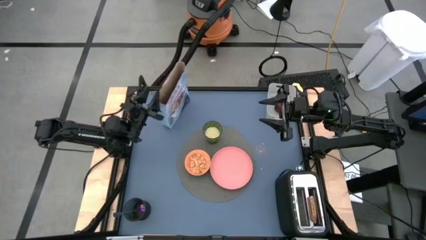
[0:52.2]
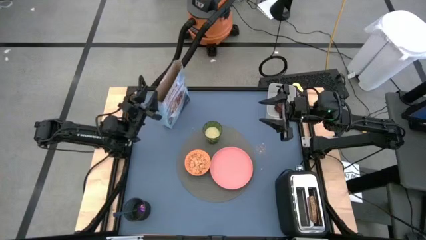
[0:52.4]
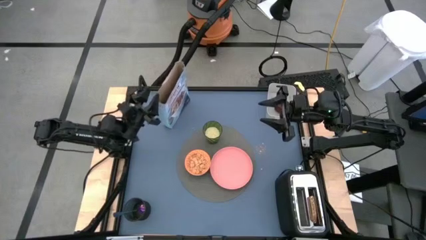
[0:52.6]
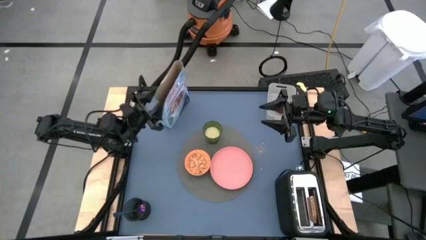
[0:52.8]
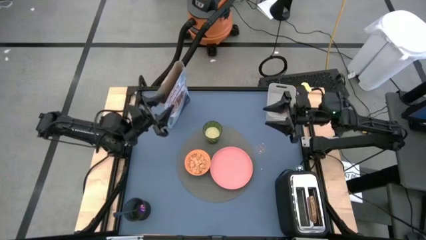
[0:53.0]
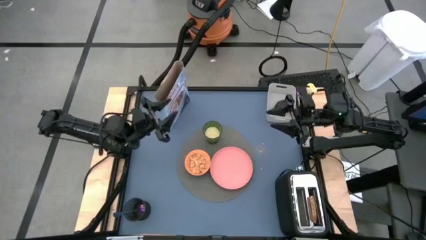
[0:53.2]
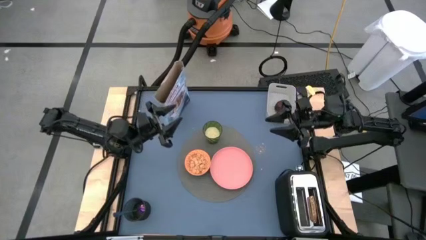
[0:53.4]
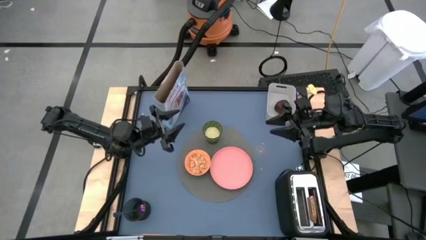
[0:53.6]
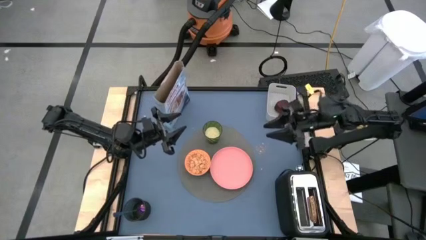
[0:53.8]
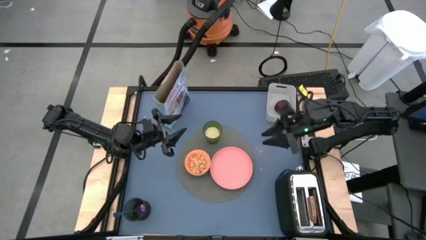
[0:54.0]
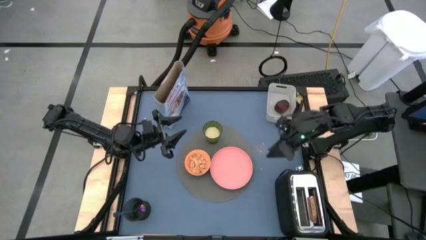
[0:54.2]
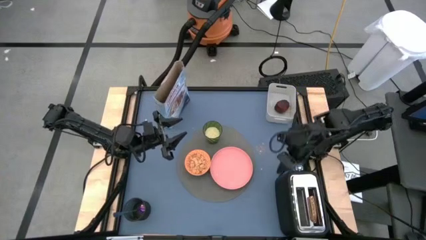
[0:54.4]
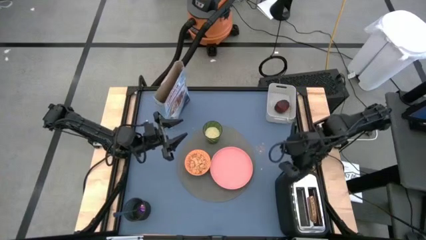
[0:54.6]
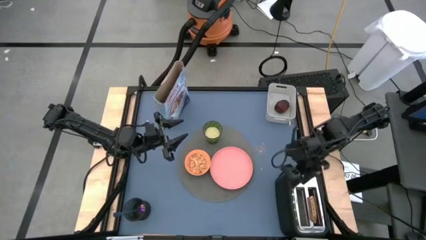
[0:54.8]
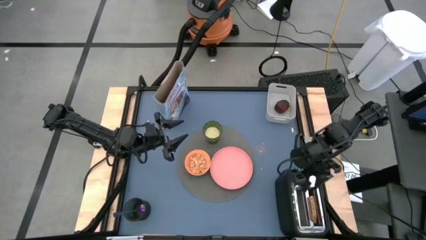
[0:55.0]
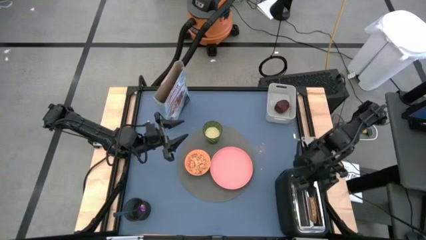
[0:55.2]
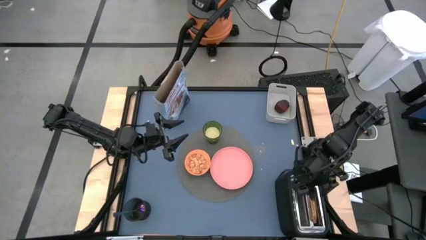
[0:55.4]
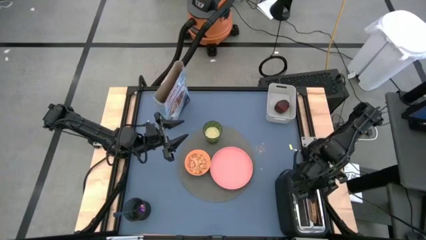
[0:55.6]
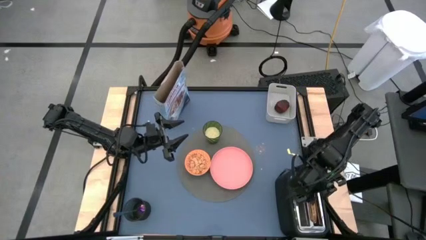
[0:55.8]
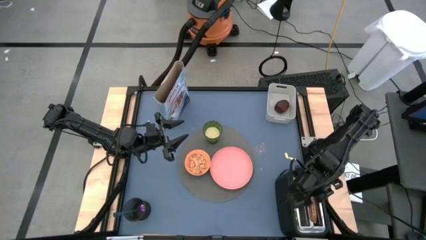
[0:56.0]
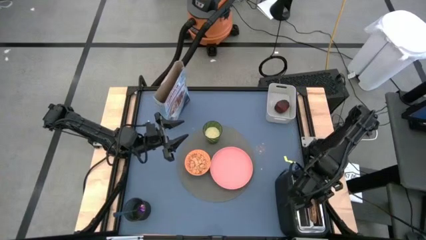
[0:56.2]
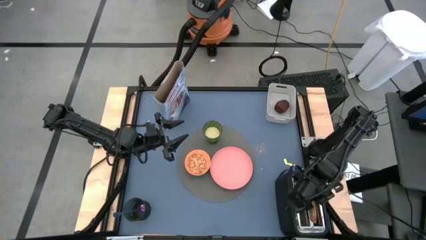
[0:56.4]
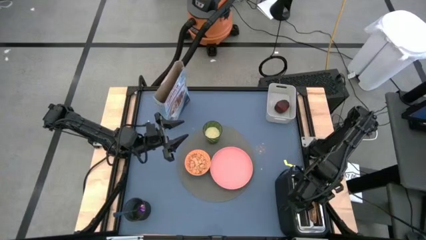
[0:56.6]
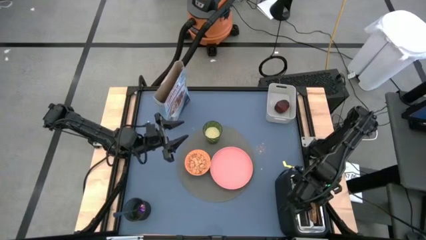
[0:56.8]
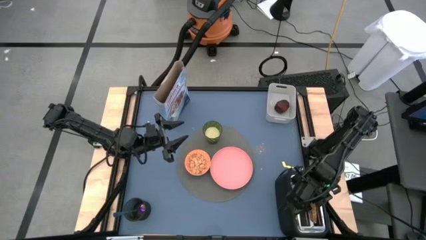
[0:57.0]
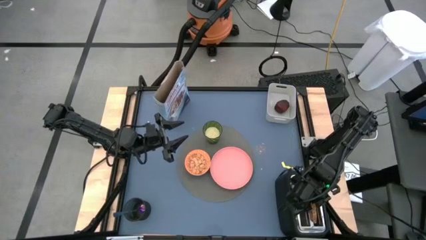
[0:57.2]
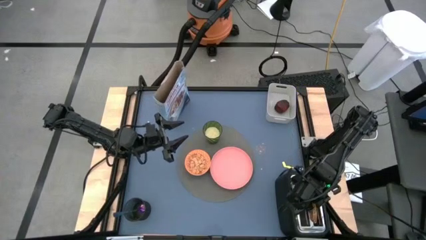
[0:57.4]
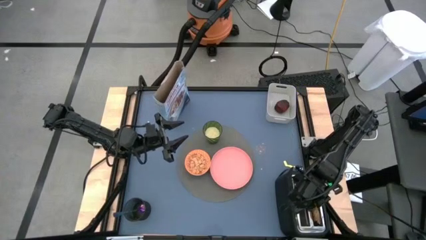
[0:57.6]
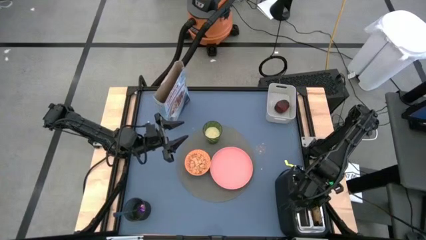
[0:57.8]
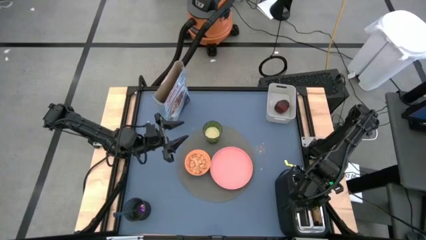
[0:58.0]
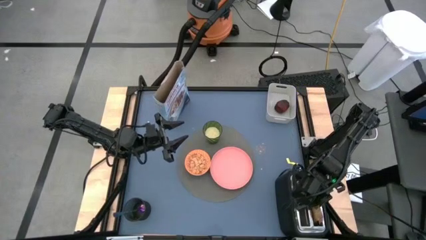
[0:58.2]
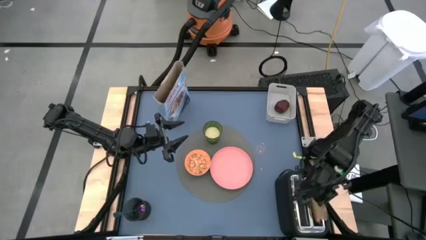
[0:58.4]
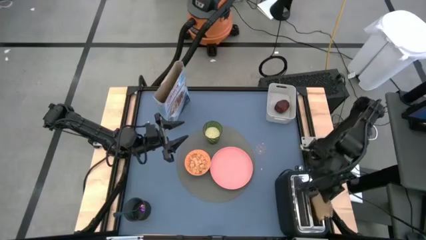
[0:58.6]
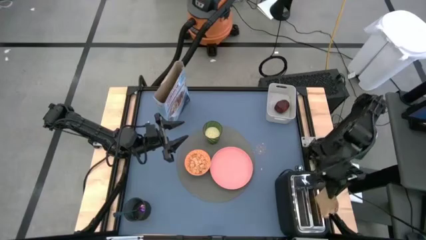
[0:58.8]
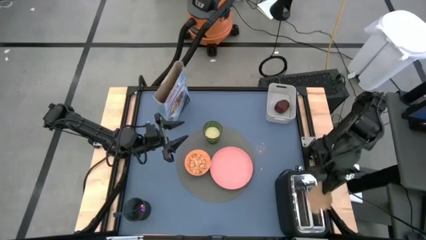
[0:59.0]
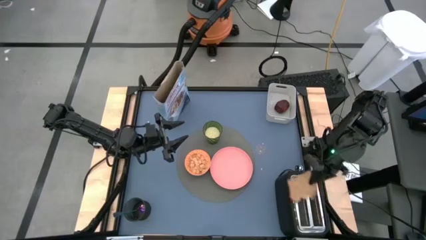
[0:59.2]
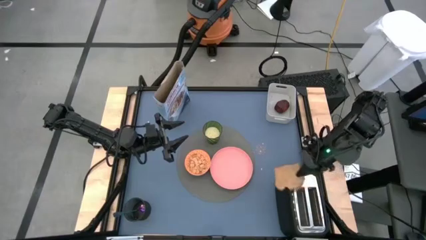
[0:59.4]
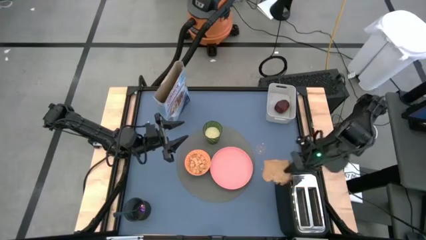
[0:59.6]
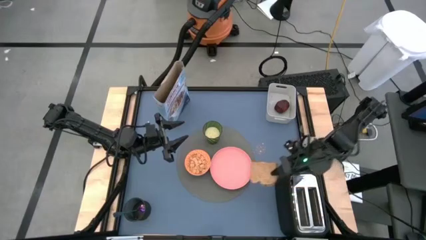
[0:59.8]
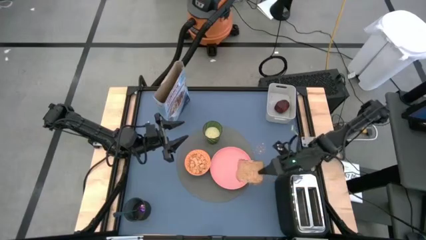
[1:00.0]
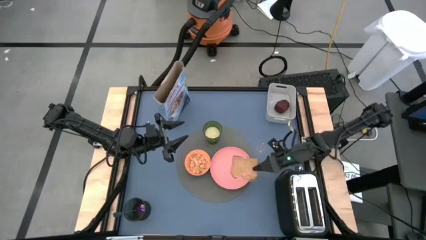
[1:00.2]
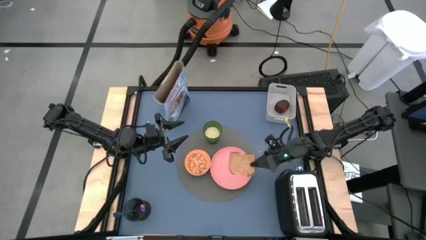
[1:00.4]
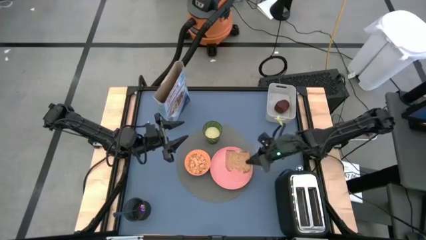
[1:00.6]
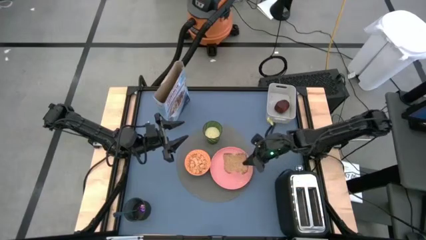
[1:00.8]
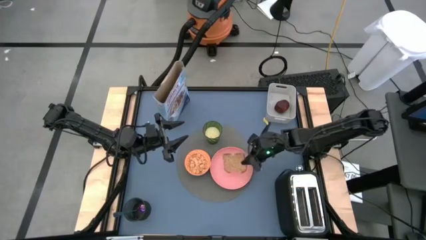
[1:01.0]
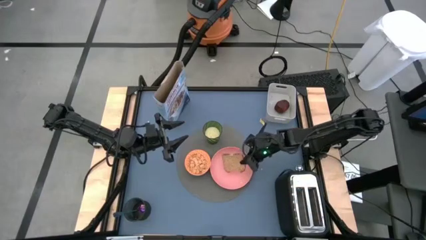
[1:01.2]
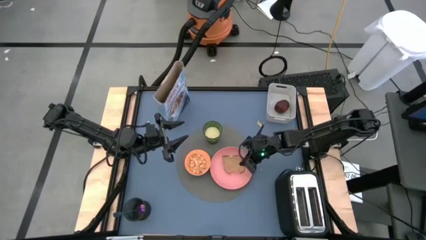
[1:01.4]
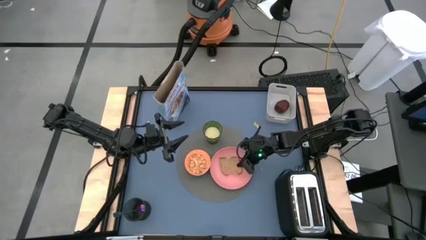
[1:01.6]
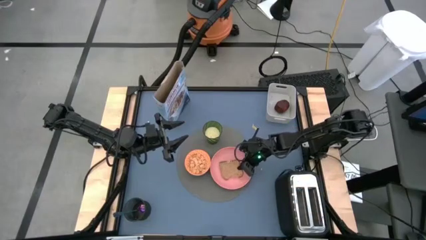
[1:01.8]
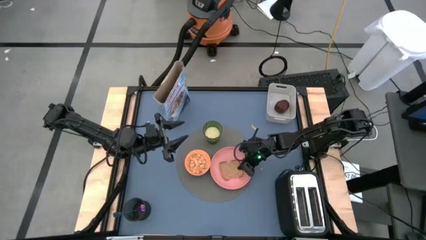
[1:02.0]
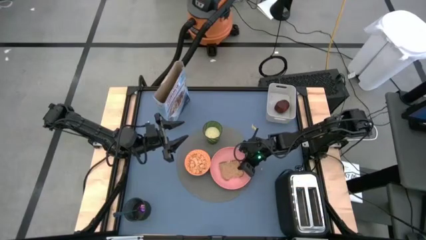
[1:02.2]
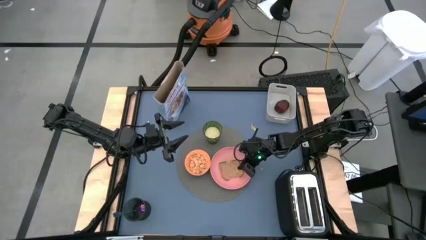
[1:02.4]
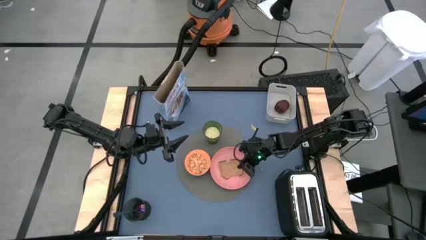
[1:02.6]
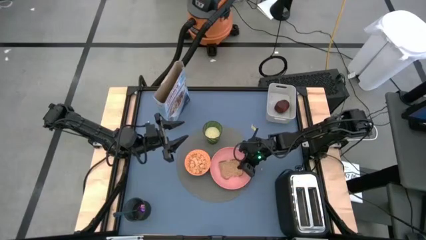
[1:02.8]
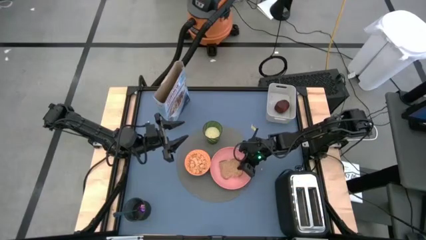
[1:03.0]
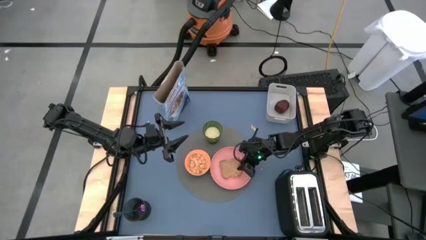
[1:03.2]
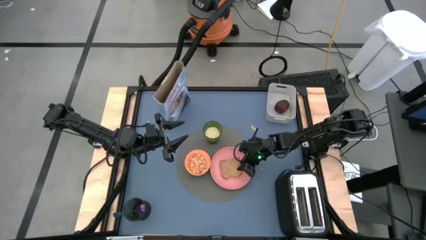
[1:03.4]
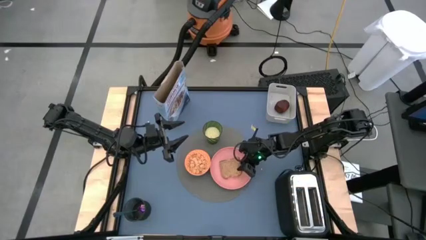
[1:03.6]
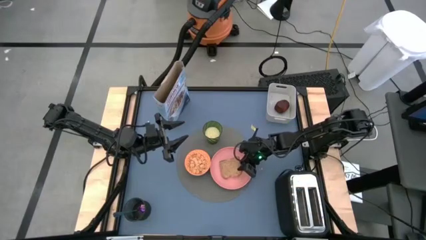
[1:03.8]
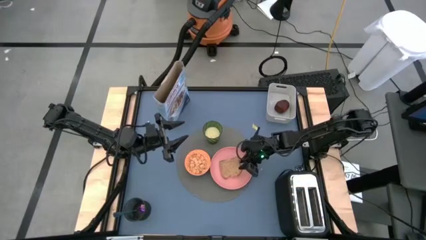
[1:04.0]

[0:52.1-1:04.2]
Task: Arrange a breakfast setting
Put the toasted bread on the pink plate

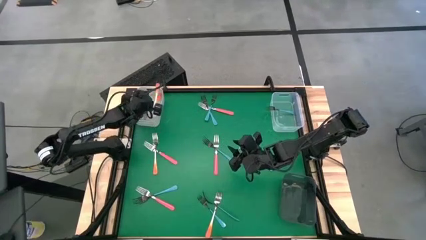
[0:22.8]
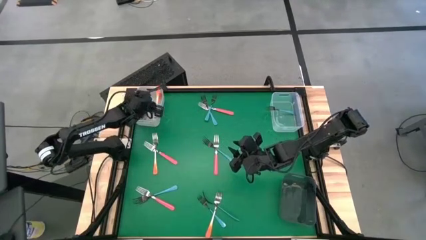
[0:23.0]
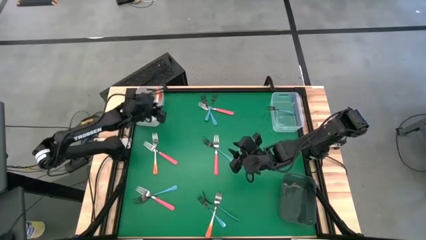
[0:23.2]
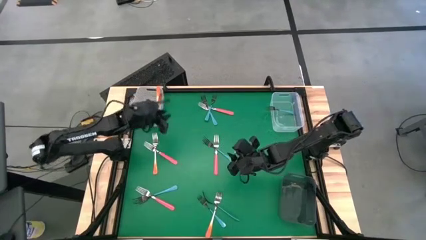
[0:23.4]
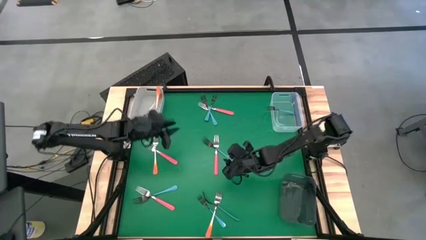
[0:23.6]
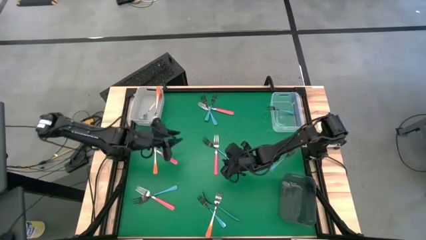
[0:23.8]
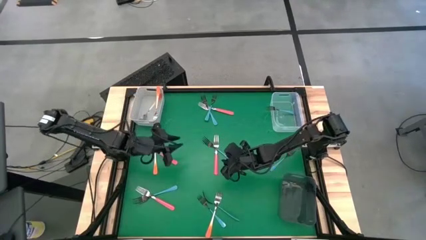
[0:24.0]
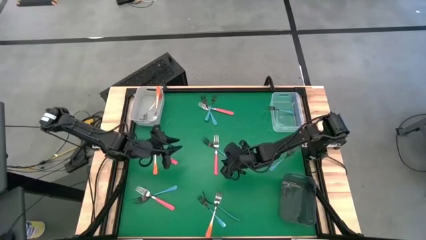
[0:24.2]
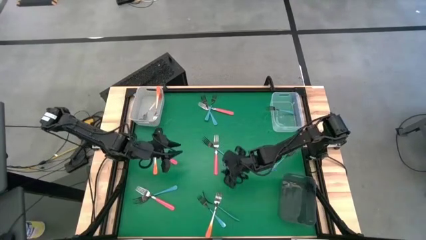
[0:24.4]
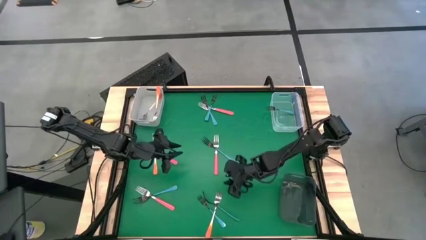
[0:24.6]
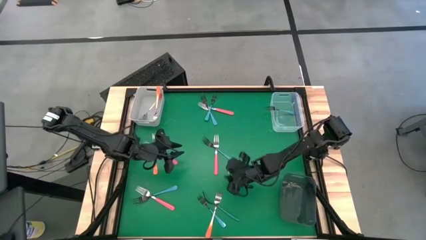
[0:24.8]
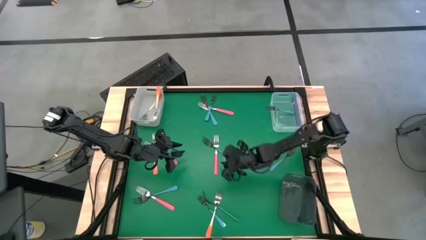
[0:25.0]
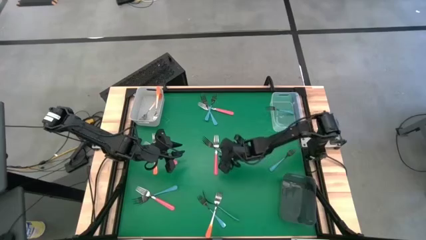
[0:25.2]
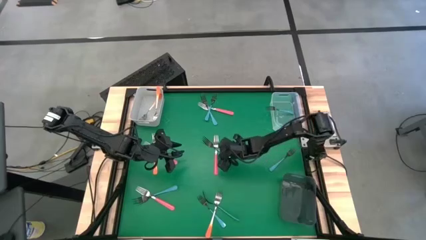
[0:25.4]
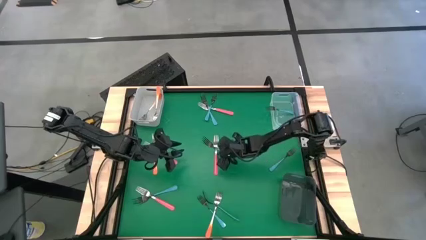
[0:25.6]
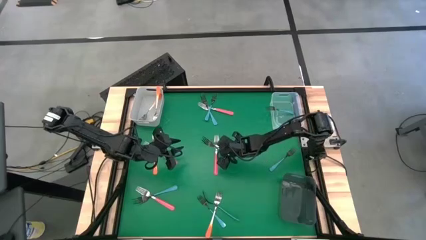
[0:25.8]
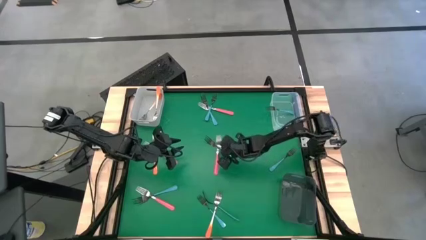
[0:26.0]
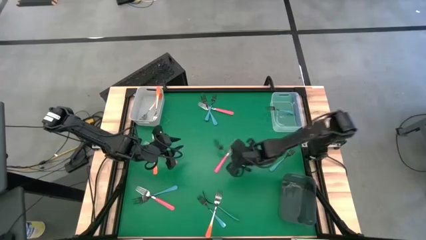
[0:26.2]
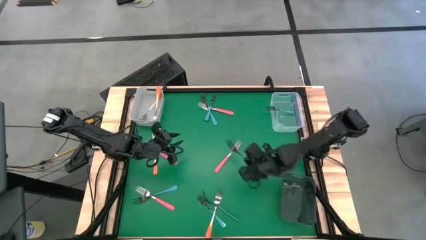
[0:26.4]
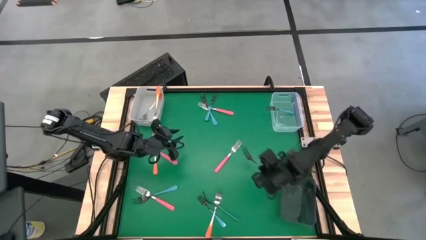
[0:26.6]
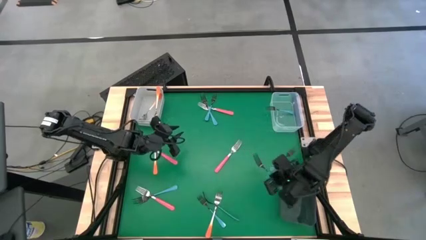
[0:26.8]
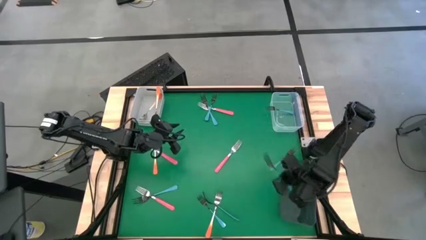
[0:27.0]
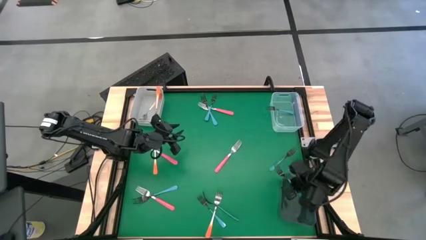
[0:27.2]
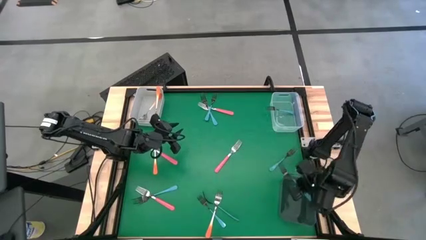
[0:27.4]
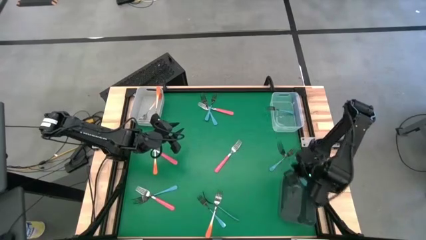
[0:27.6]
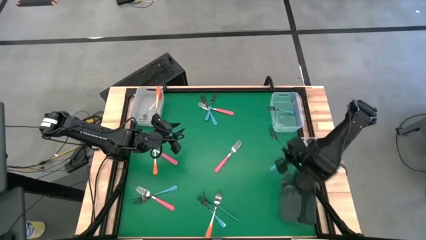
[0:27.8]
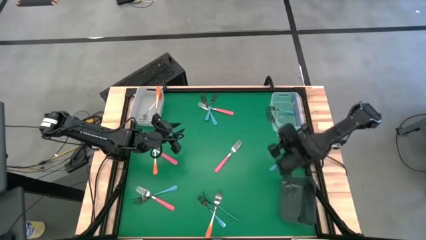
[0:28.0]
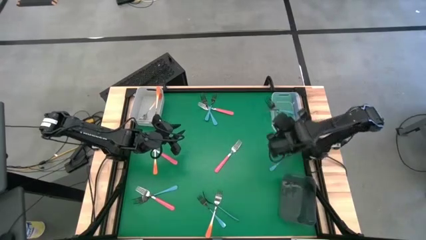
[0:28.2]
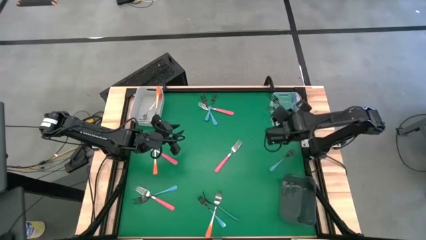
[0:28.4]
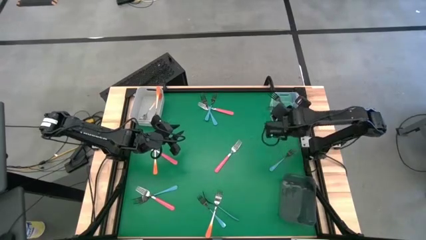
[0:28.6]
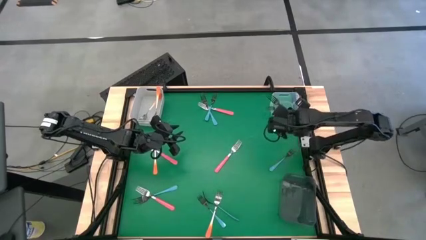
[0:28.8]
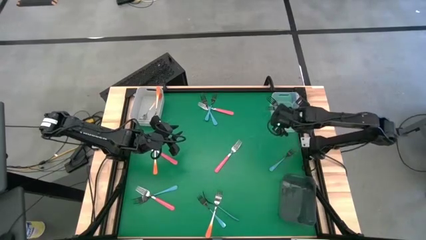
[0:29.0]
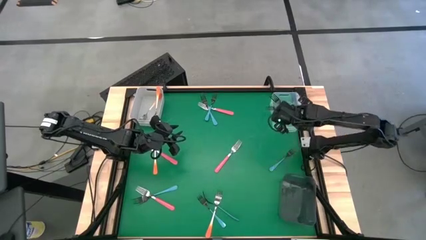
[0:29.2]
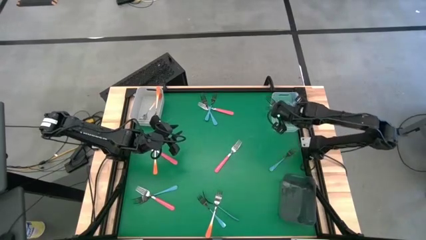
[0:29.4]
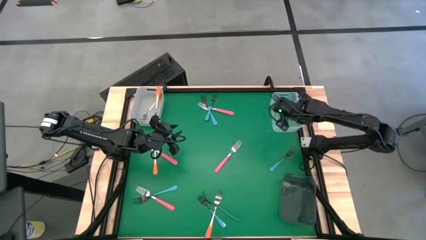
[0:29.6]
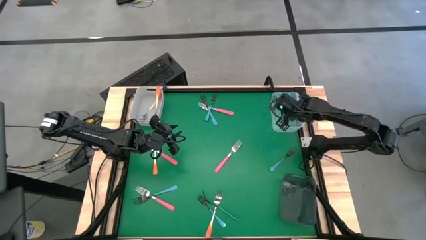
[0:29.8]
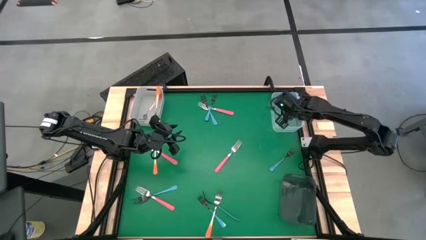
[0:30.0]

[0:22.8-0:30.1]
Task: Sort silverware by color (type)
Put the blue fork into the transparent bin
